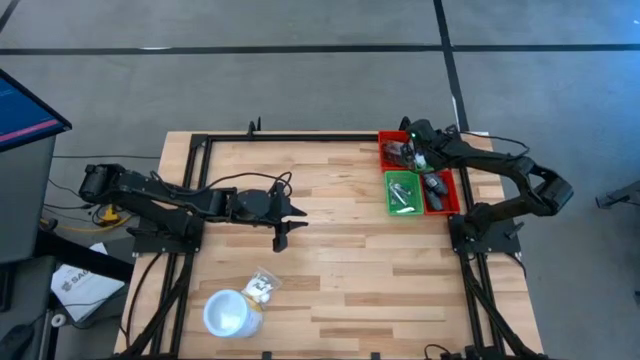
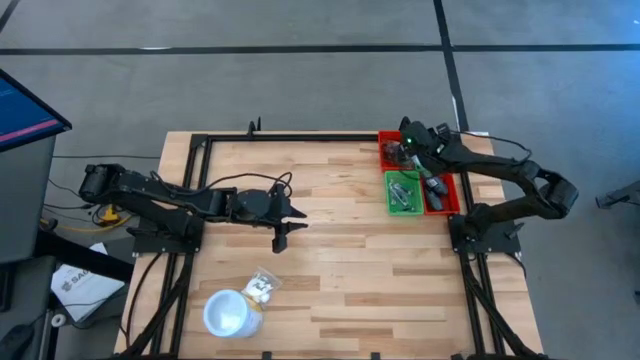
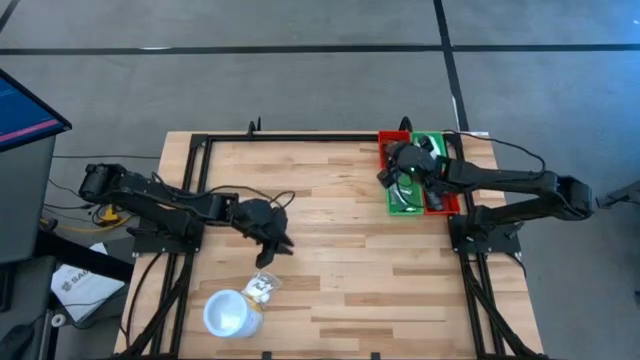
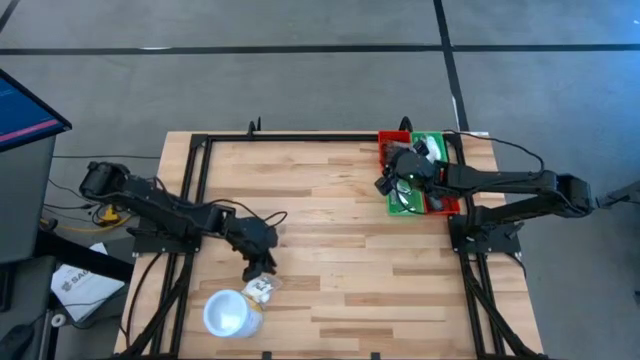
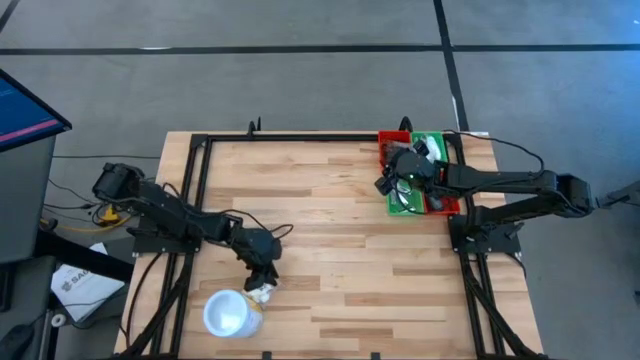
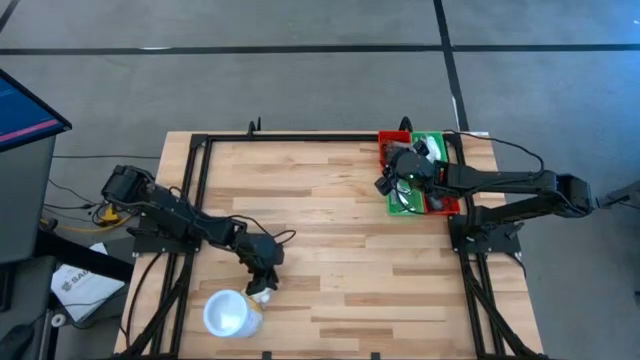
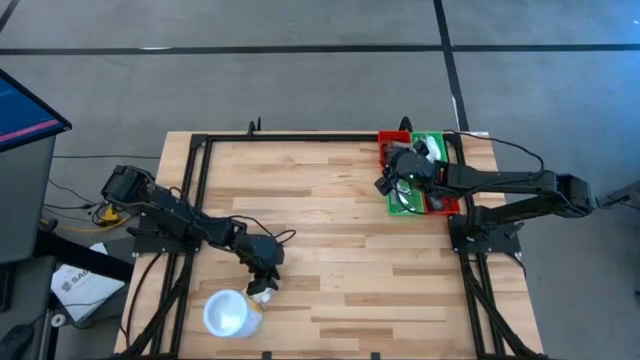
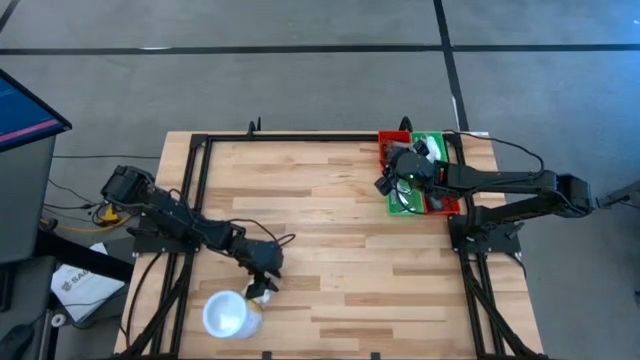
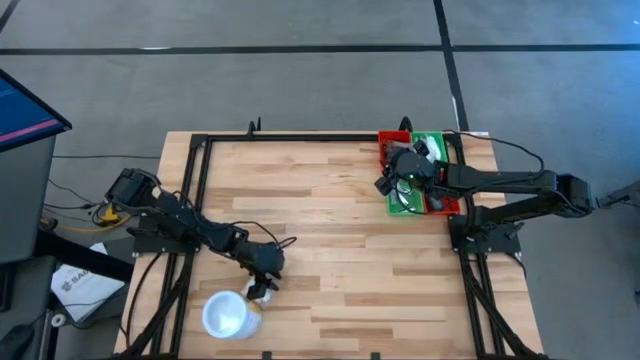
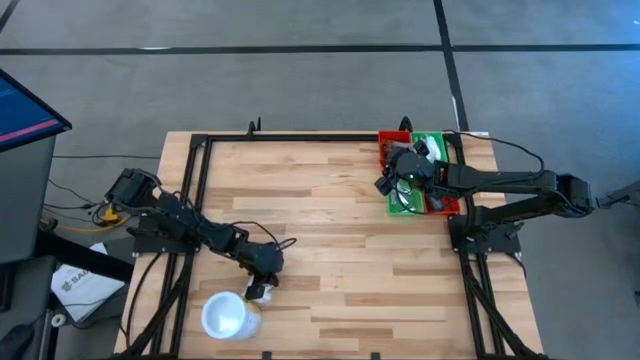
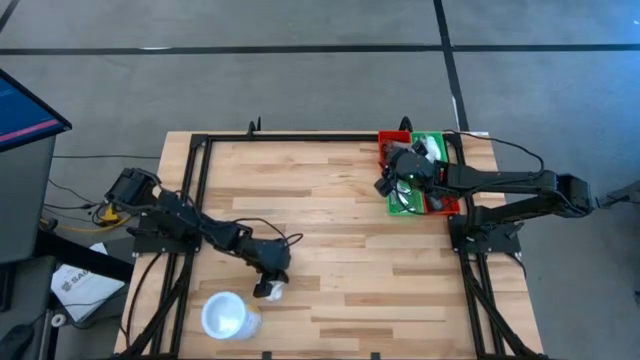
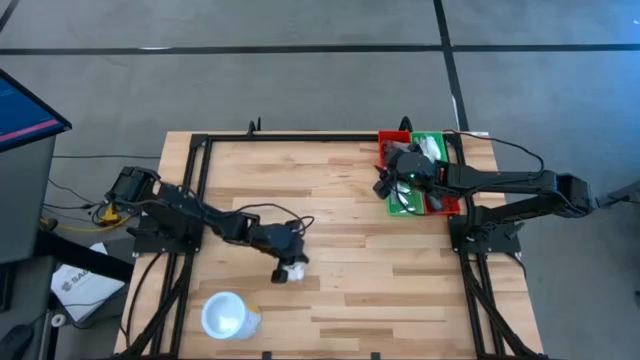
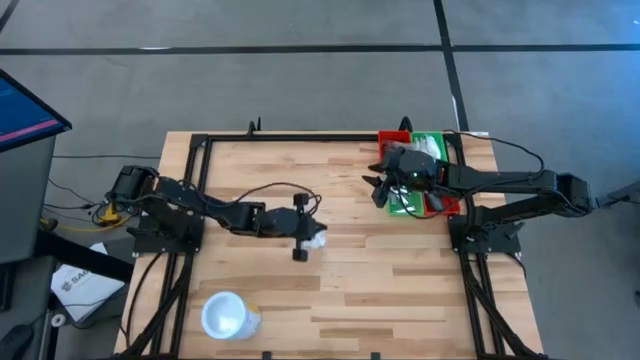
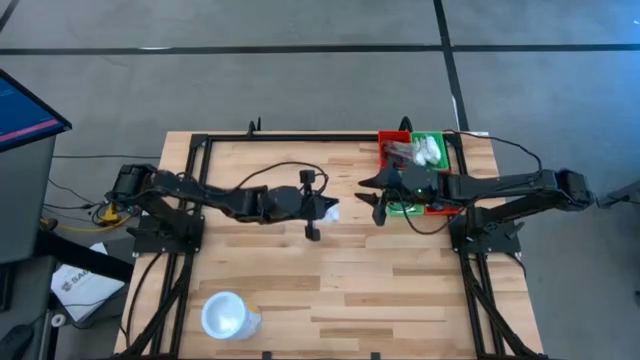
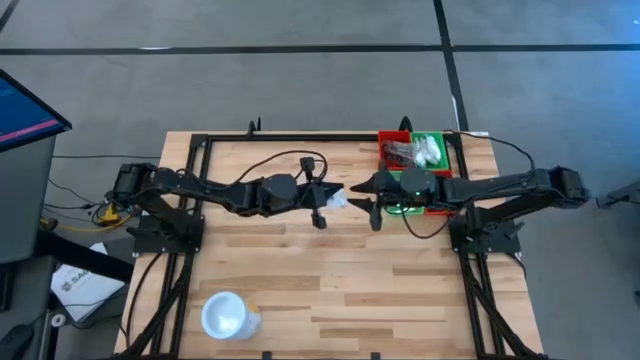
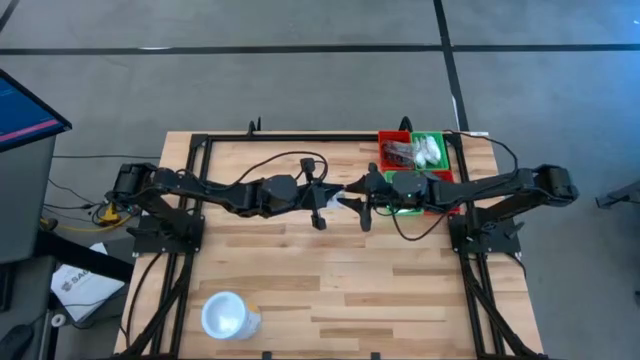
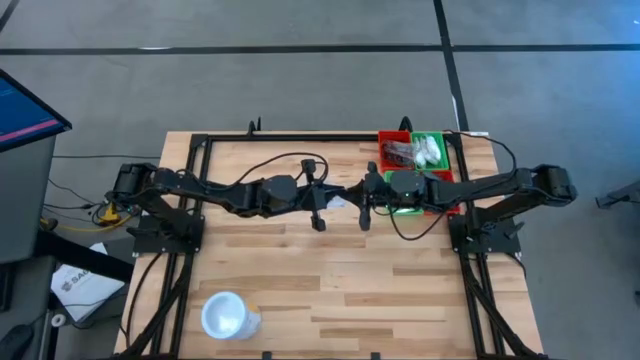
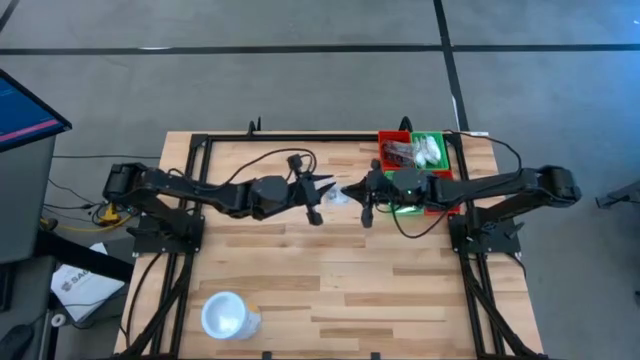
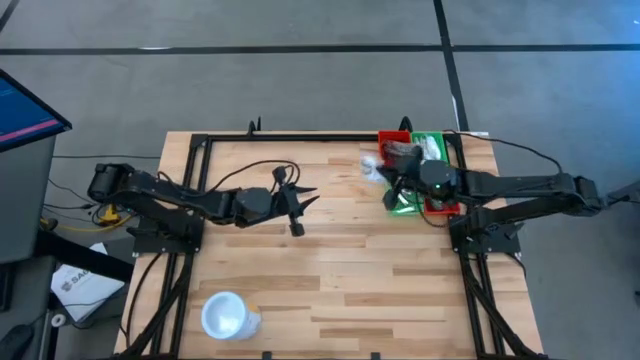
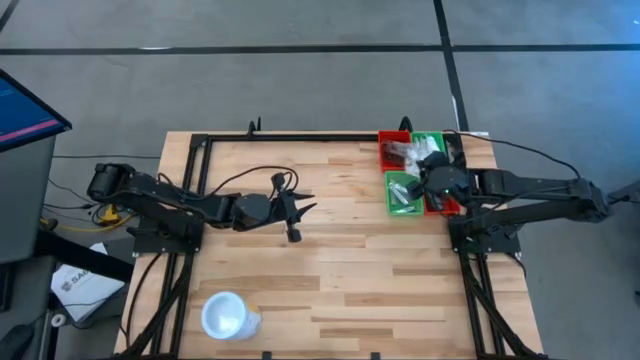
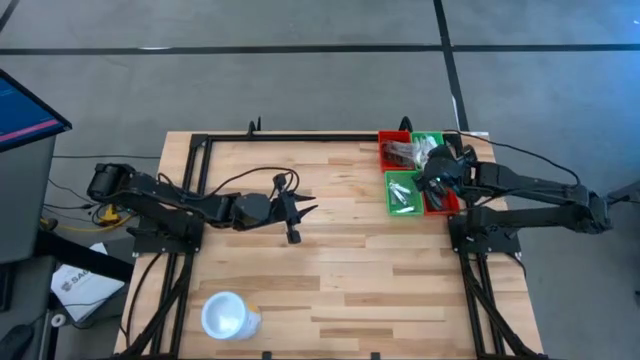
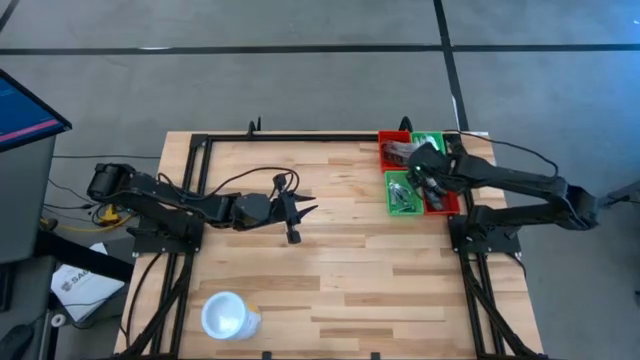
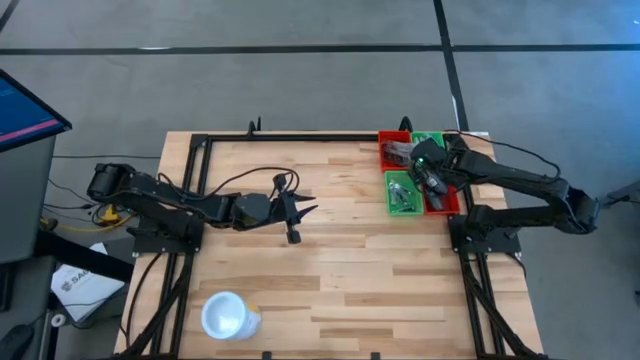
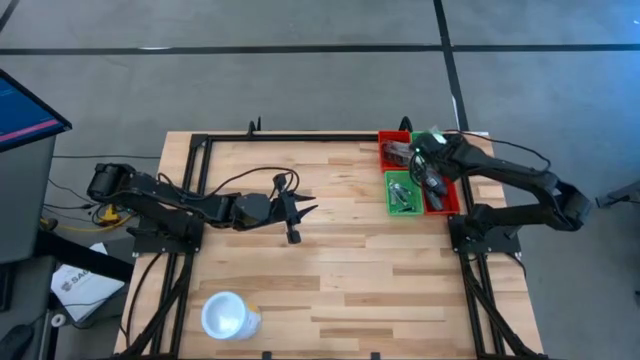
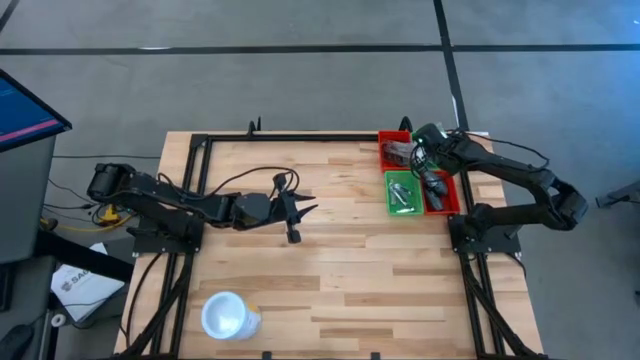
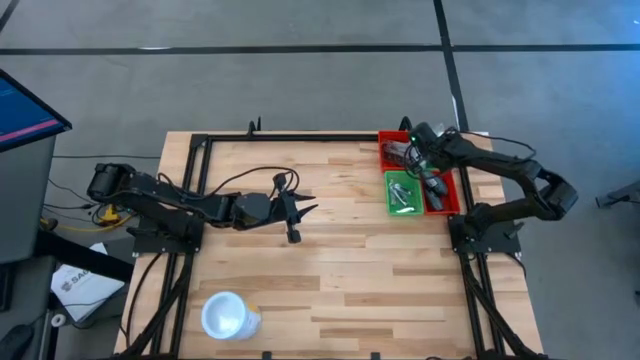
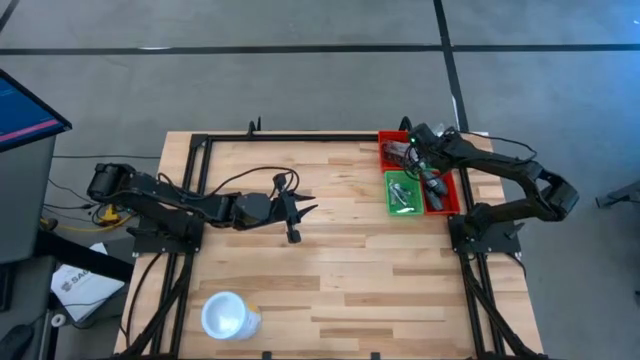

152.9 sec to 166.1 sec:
Task: Pick & Place Travel size toiletries
Put the white cotton pack into the top green bin

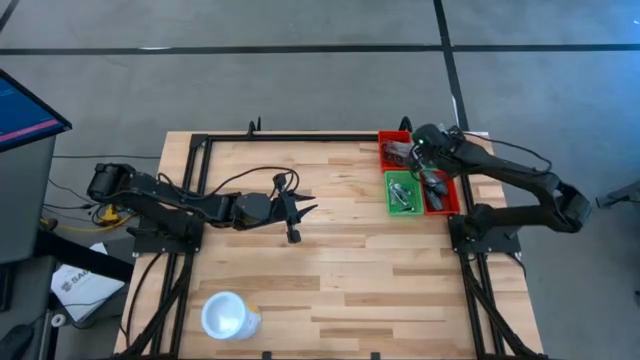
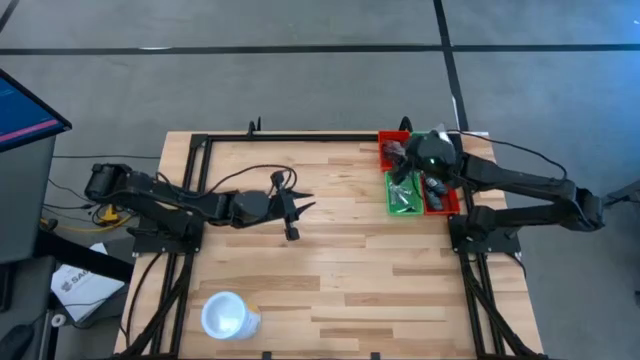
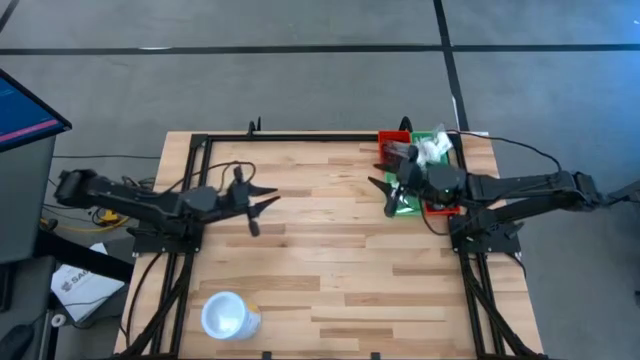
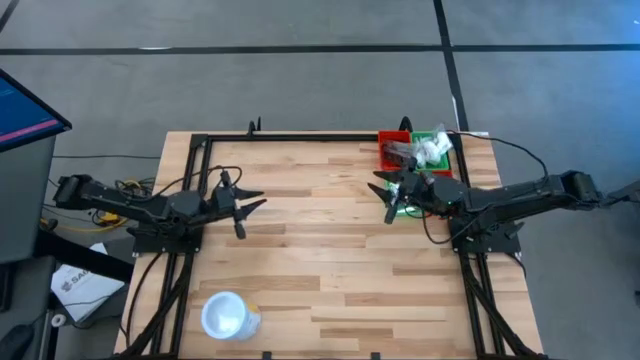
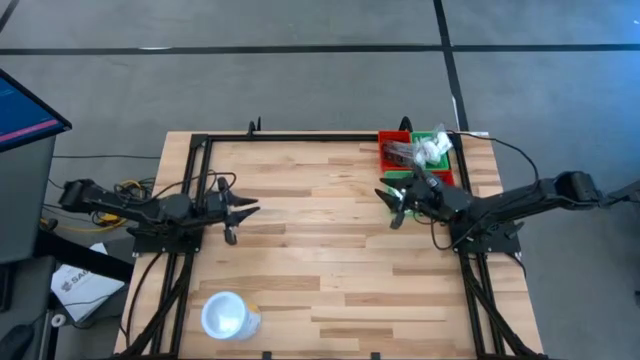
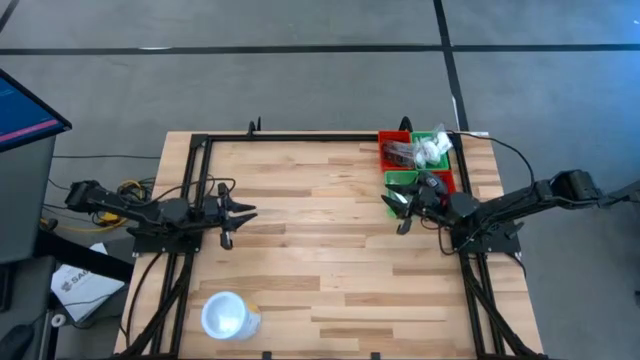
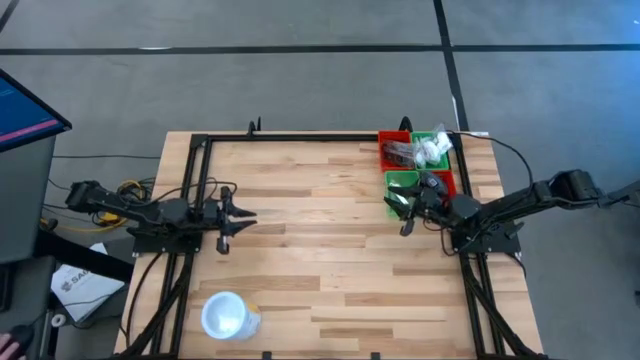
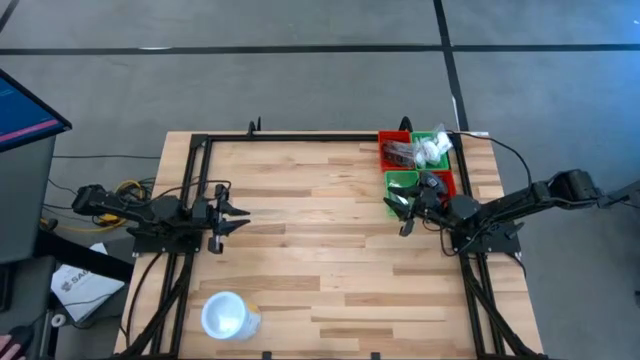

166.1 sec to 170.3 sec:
Return to Home Position

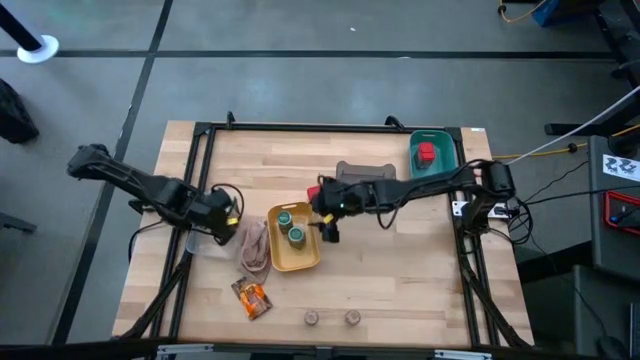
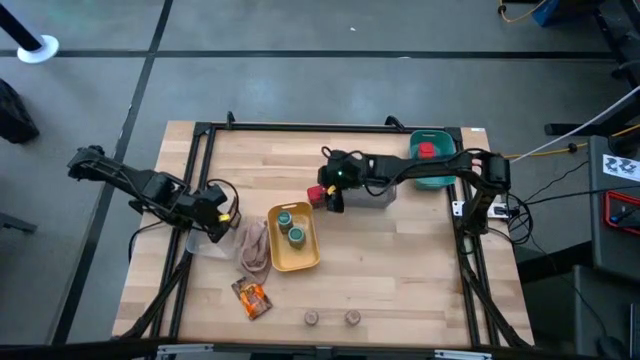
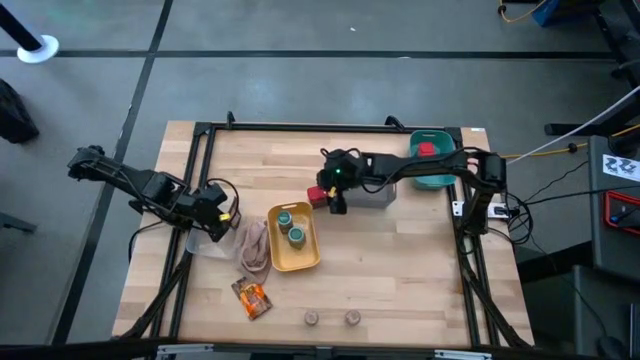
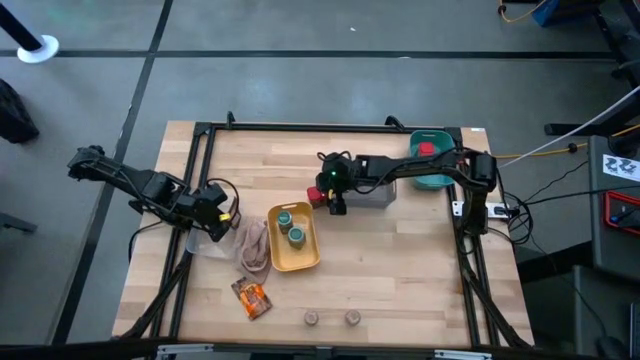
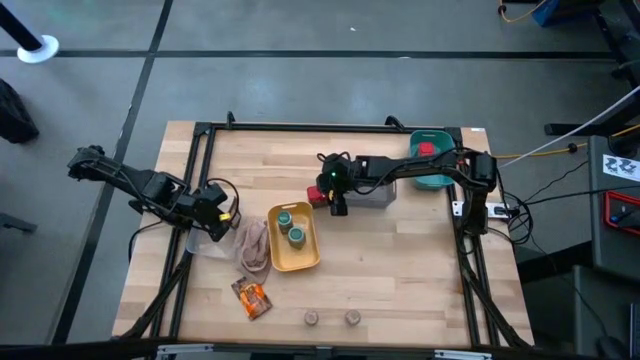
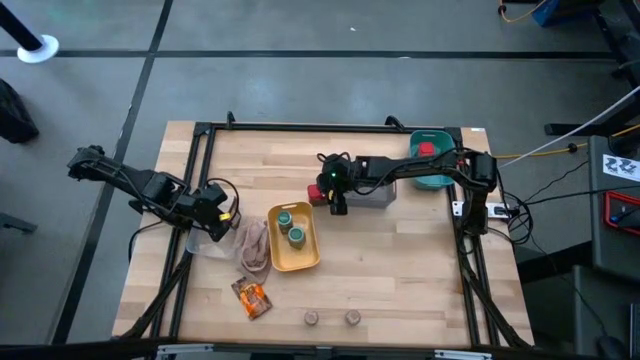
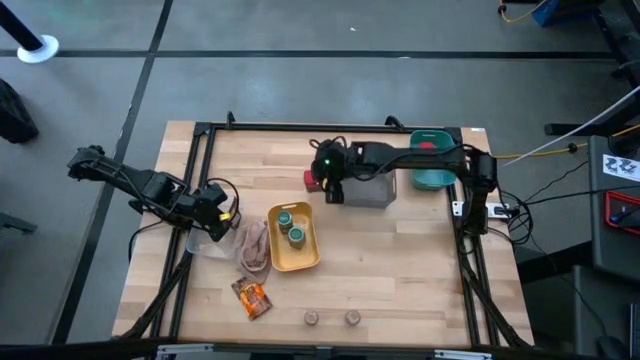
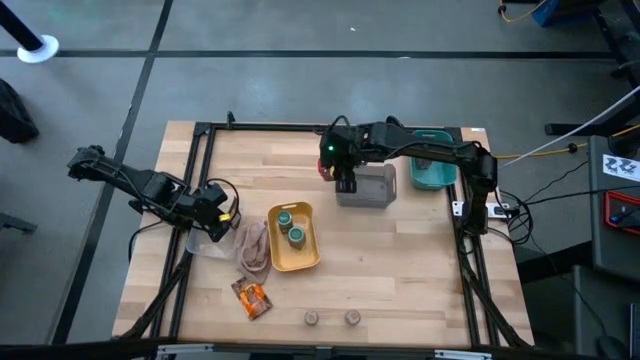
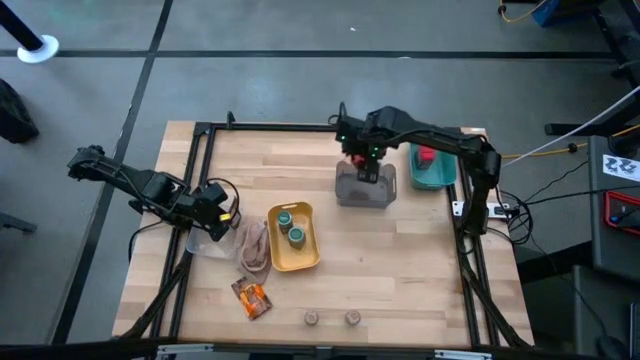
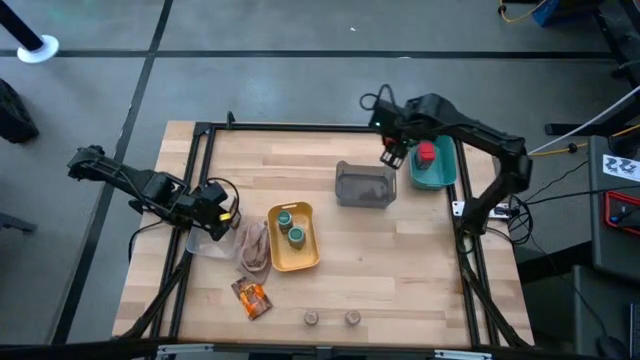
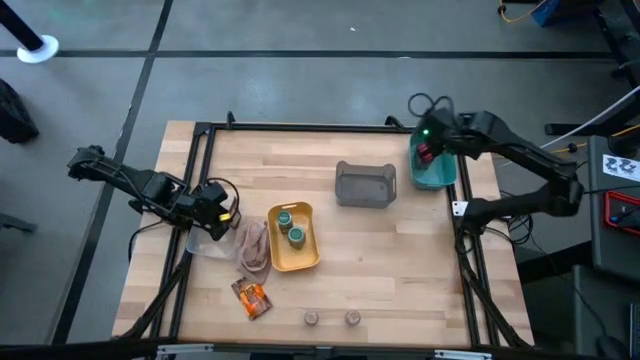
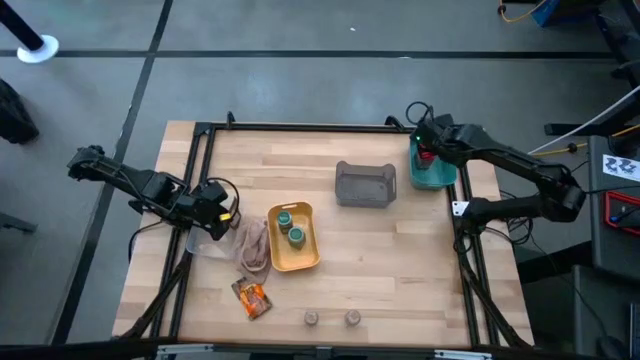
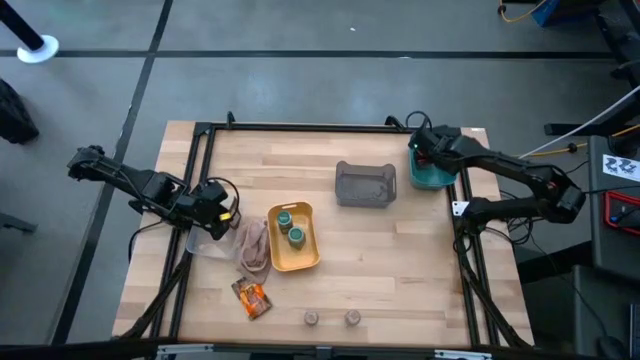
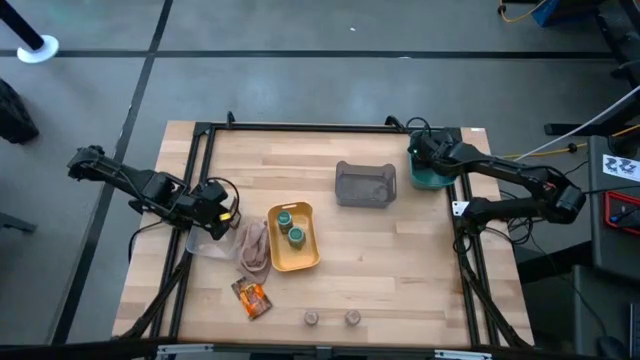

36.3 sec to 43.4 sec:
Task: Sort spices by type
Put the red seasoning can into the green bin
